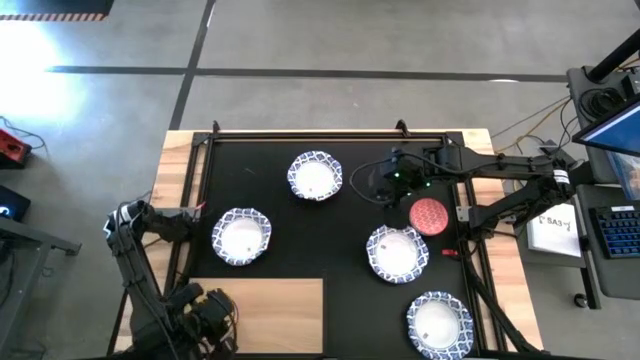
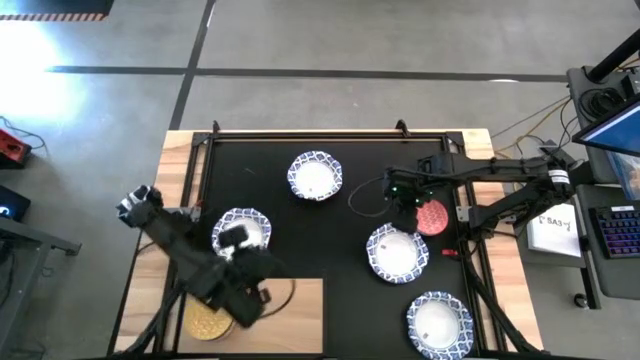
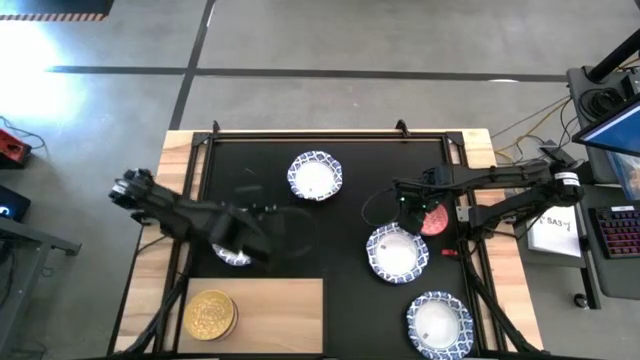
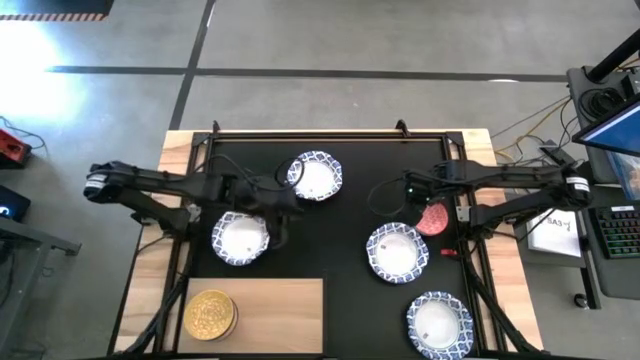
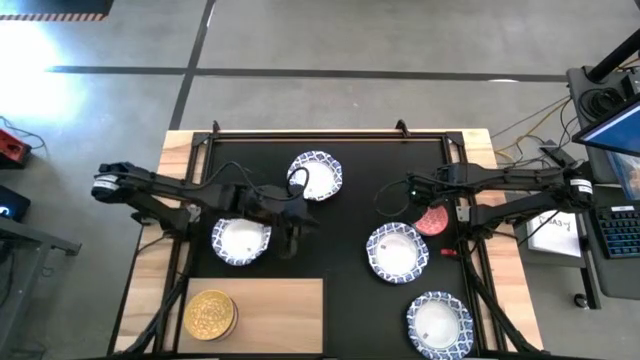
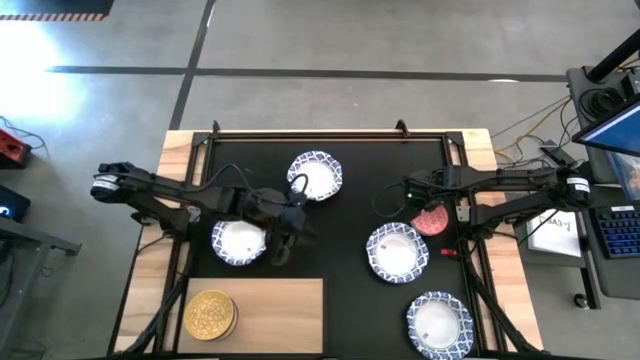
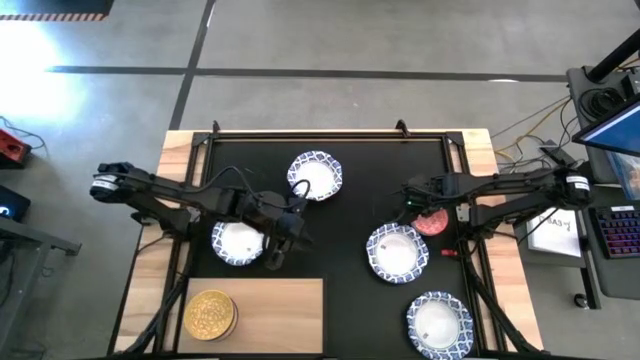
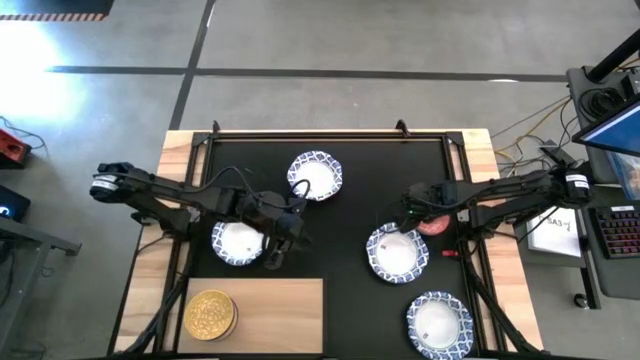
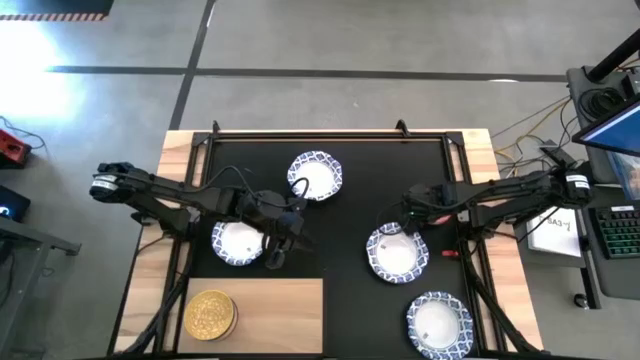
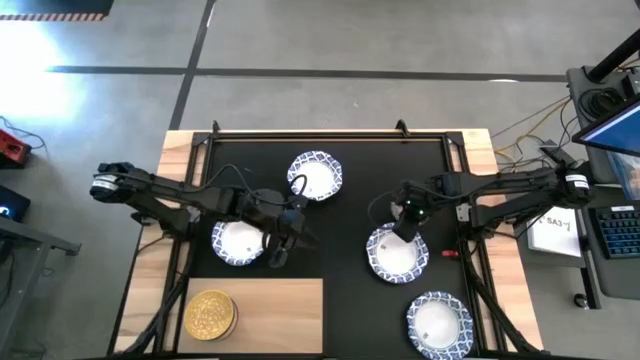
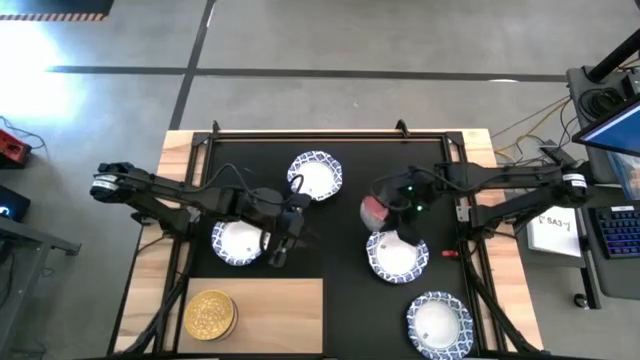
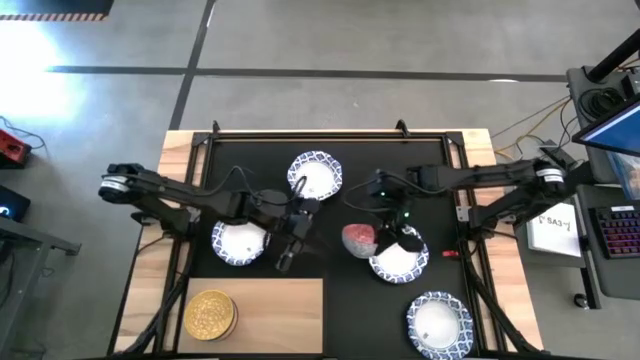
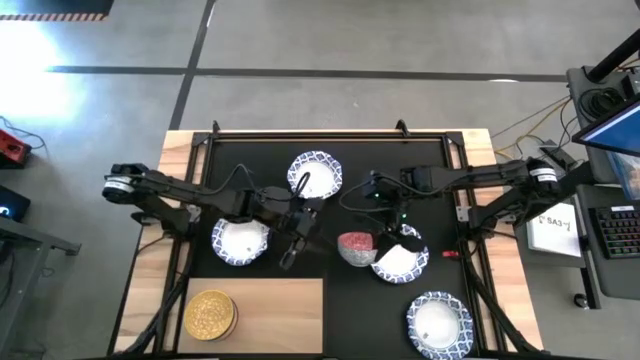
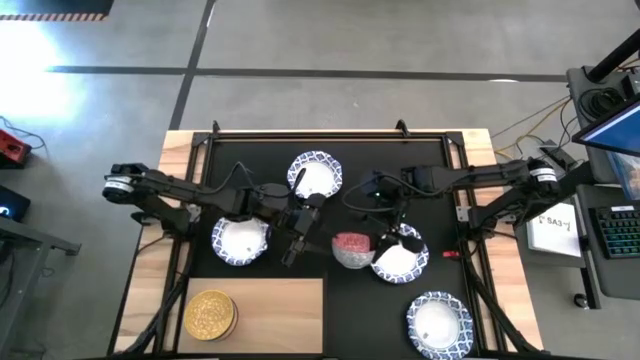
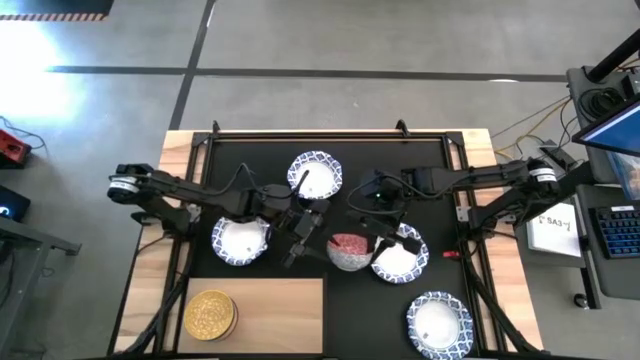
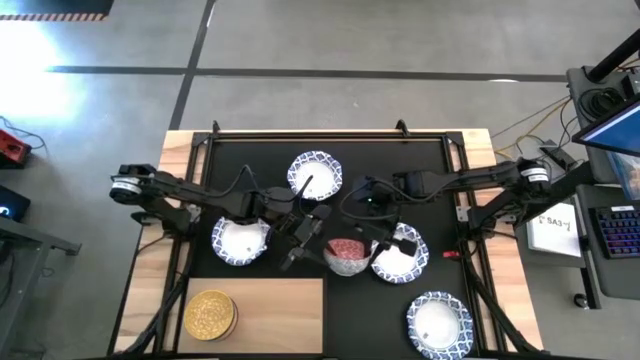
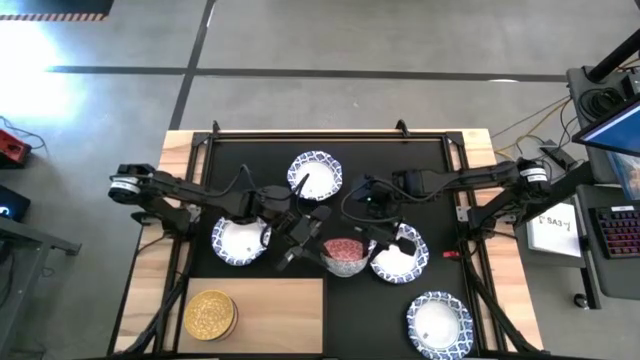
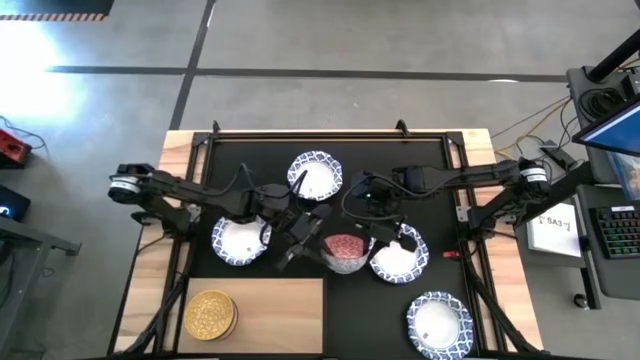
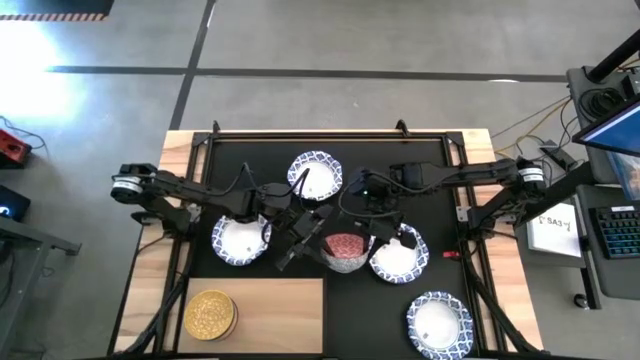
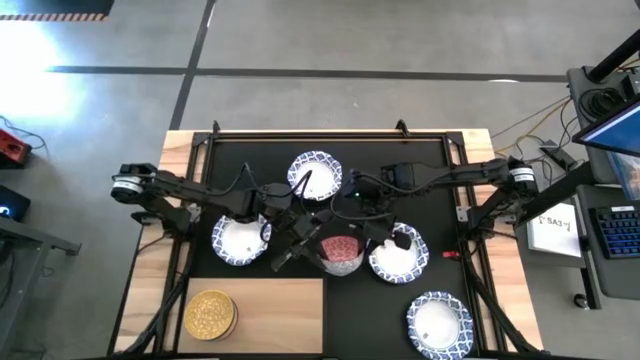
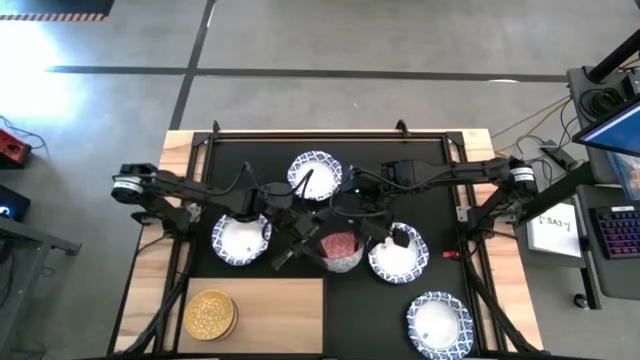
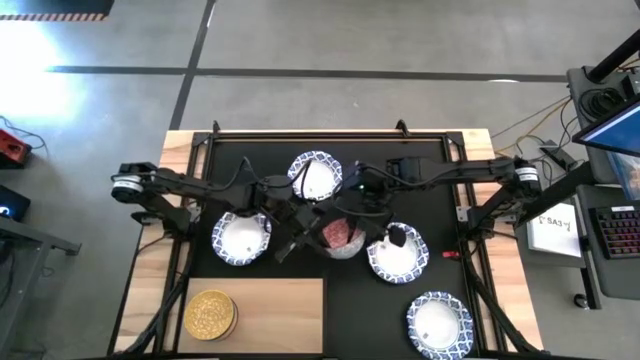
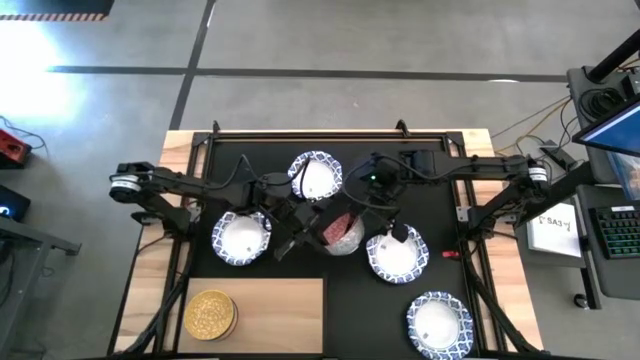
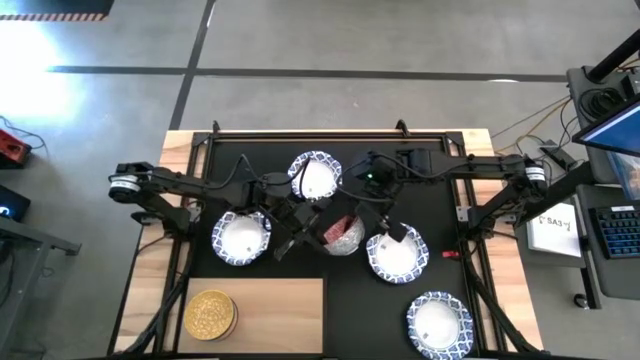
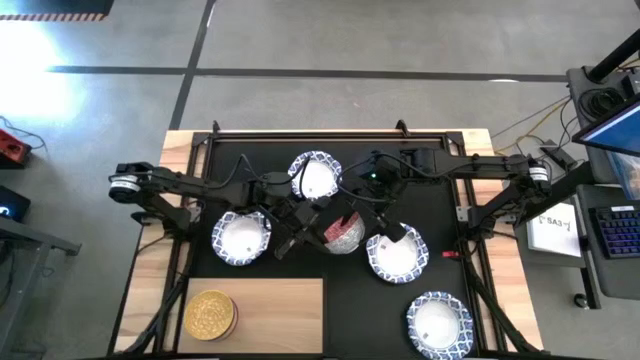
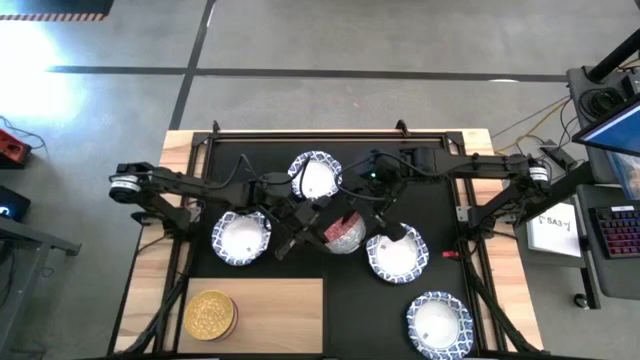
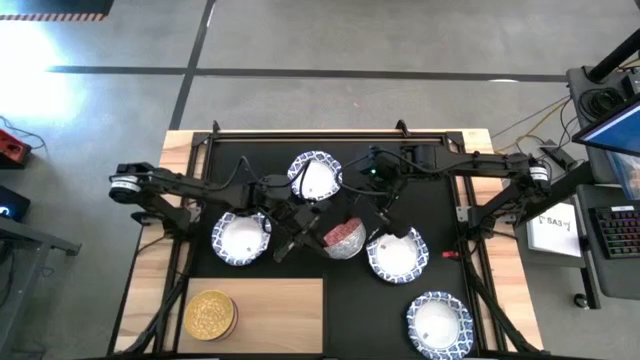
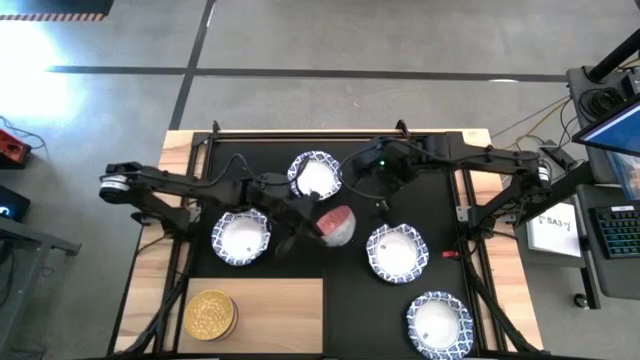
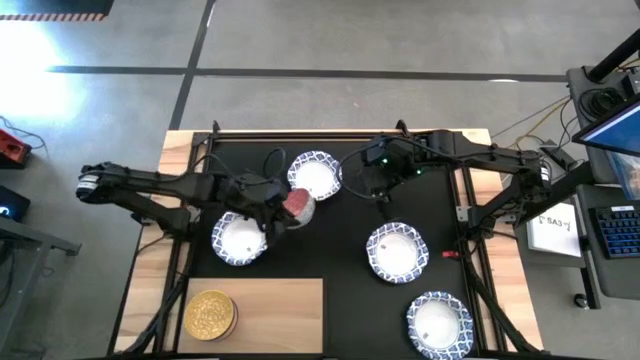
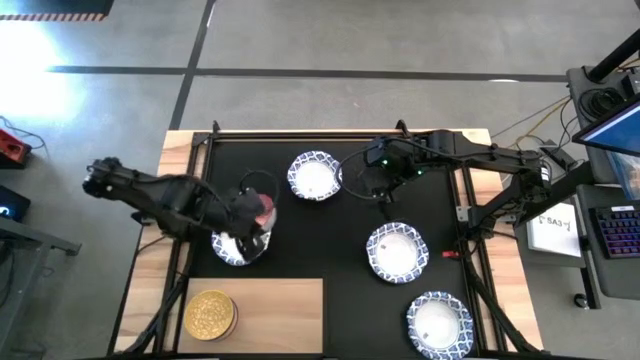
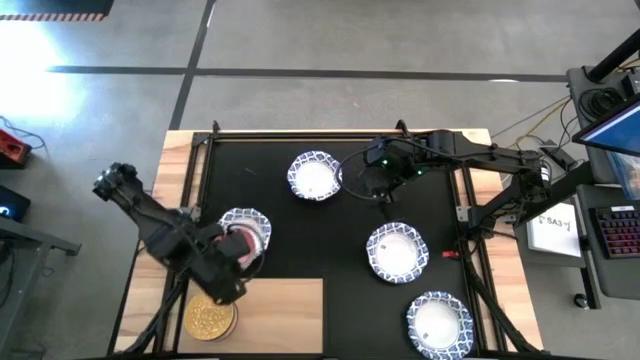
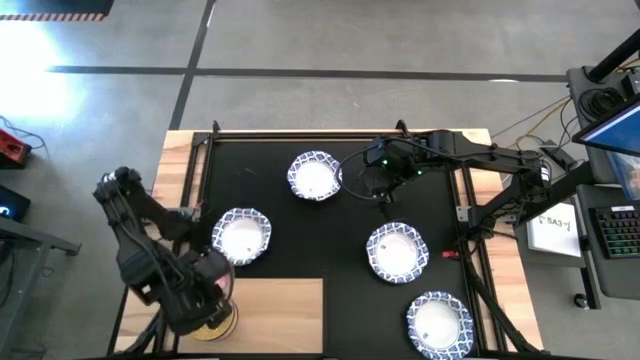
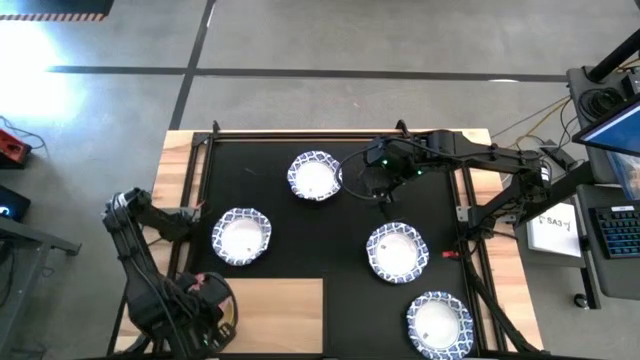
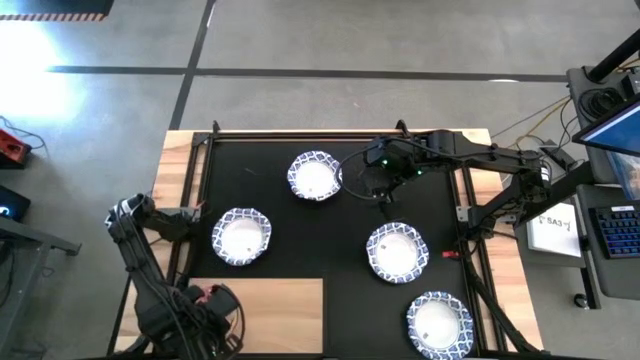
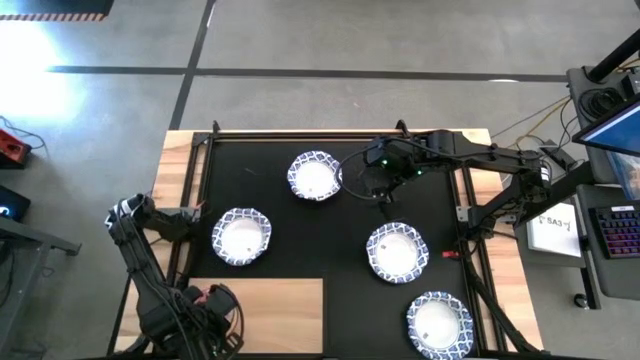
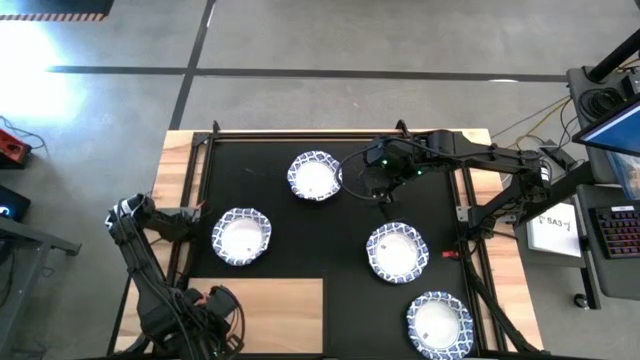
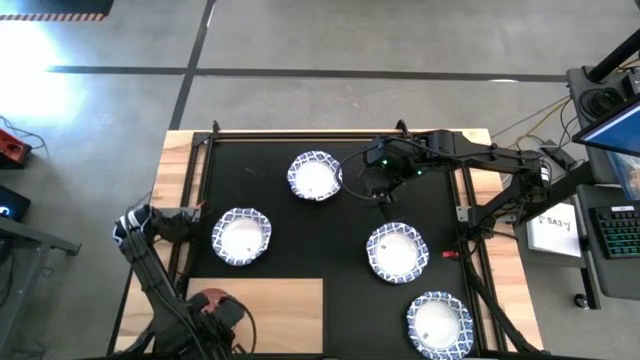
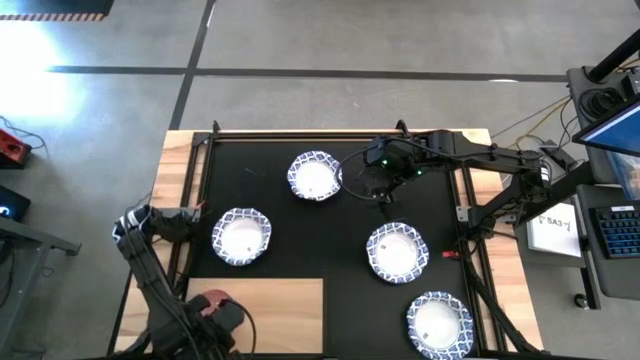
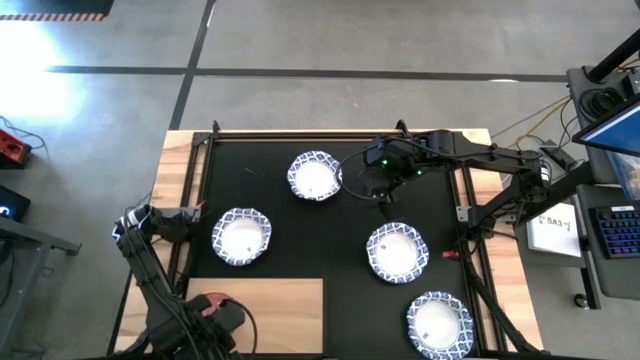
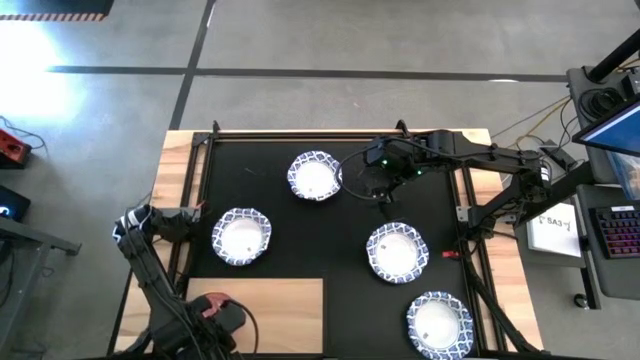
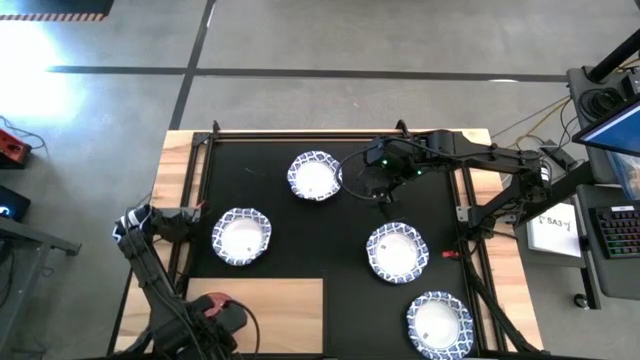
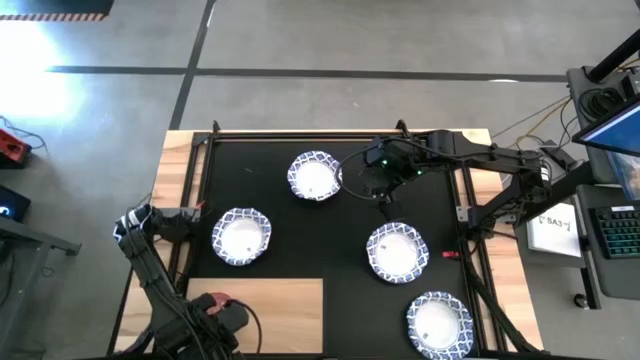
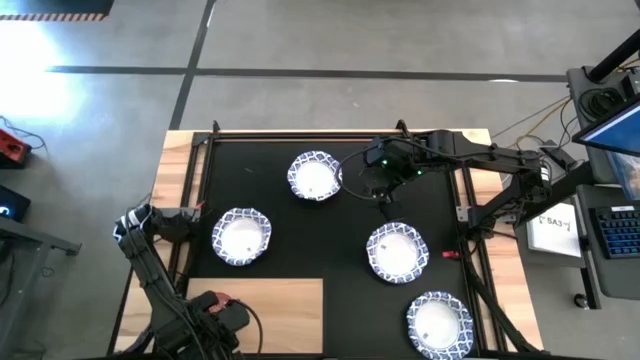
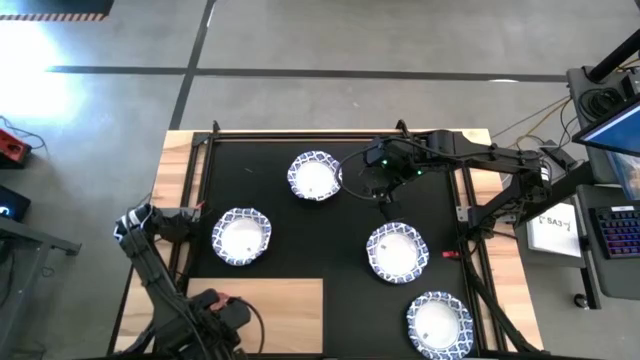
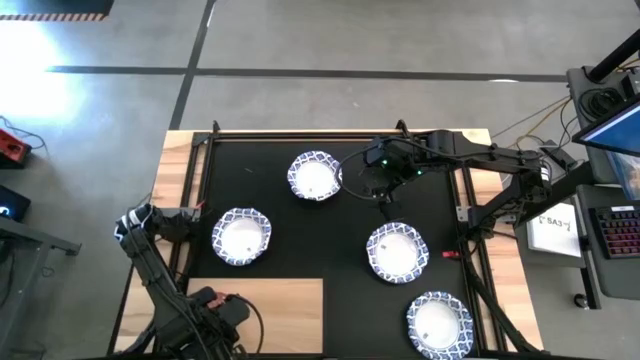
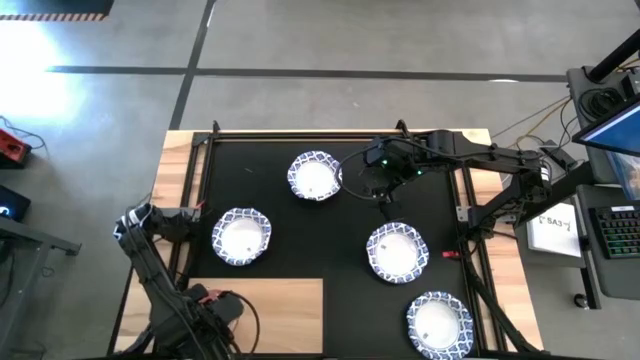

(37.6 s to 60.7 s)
Task: Place and stack bowls onto a shelf
Stack the red patterned bowl on top of the yellow patterned bowl on the shelf
